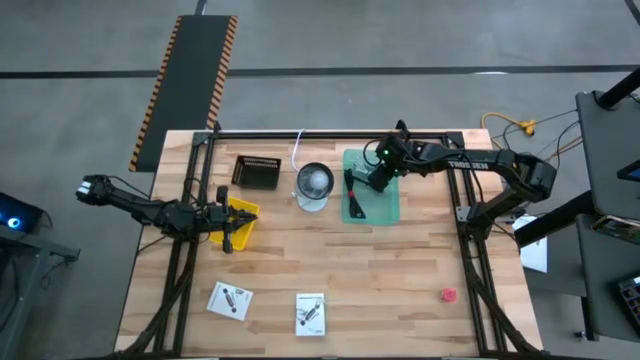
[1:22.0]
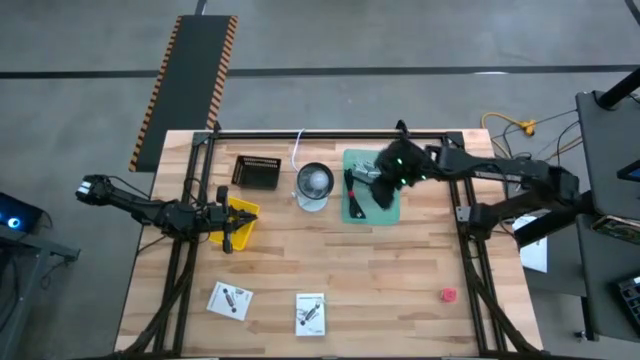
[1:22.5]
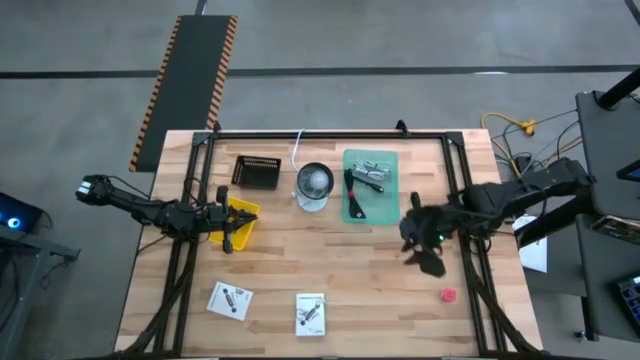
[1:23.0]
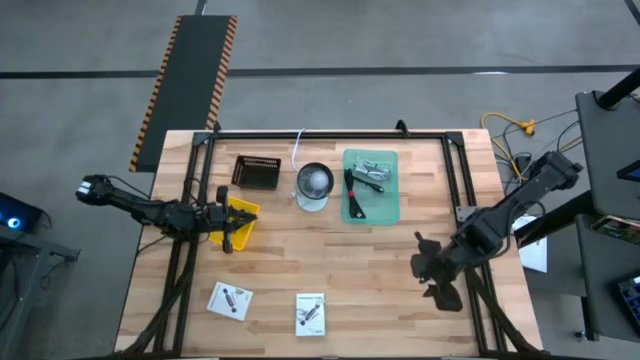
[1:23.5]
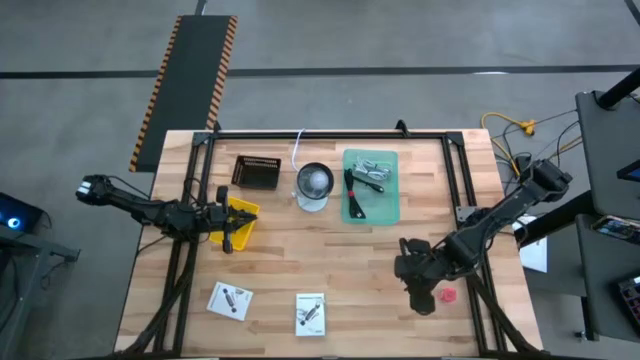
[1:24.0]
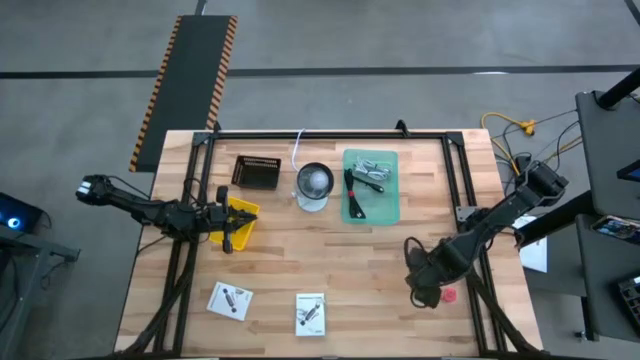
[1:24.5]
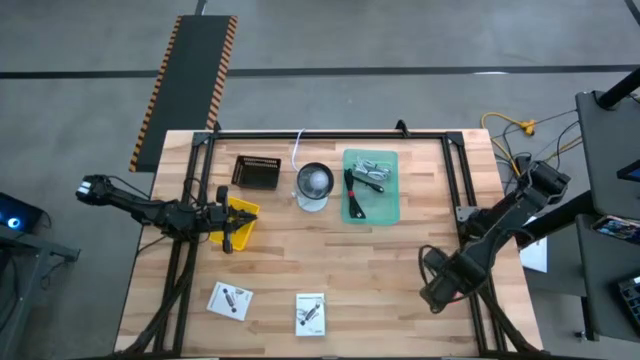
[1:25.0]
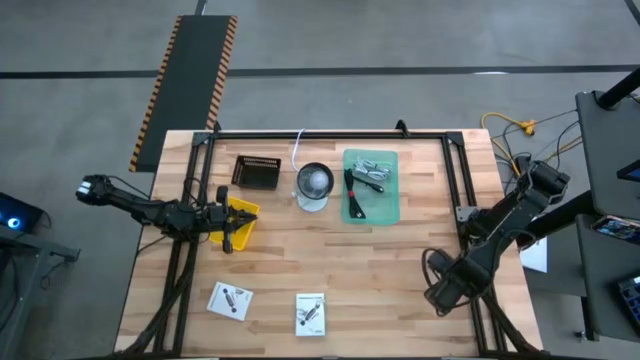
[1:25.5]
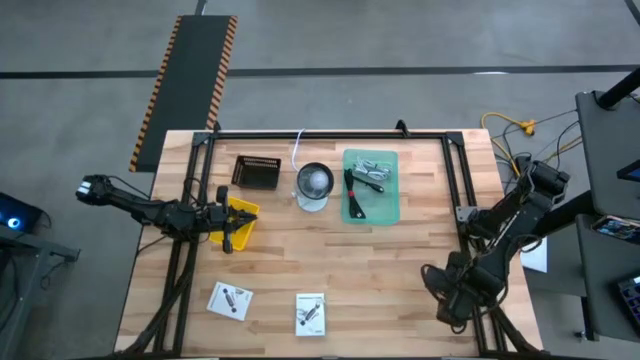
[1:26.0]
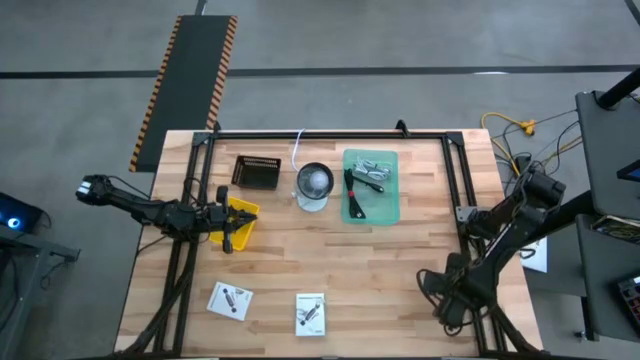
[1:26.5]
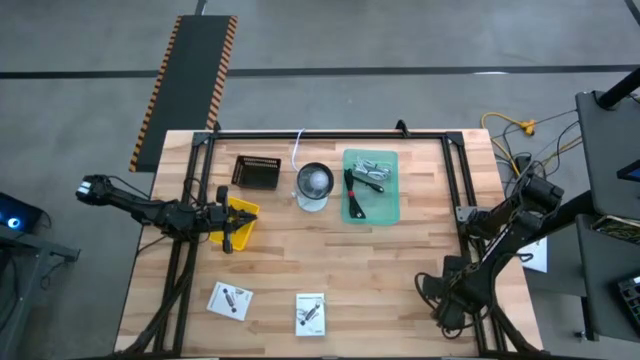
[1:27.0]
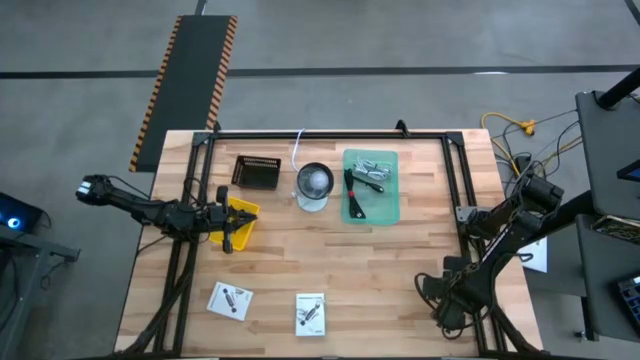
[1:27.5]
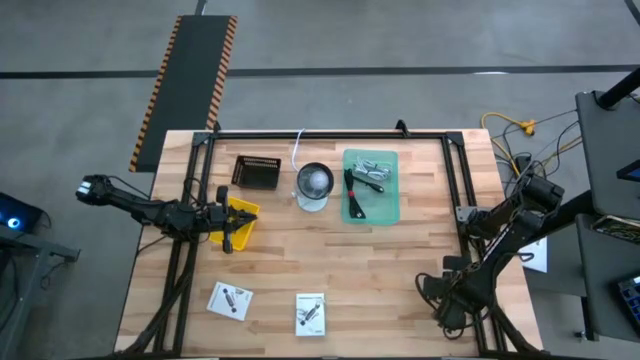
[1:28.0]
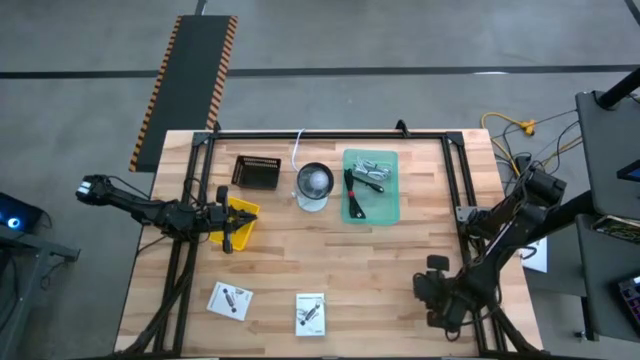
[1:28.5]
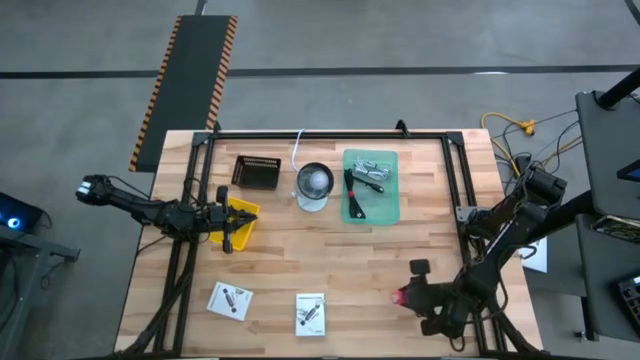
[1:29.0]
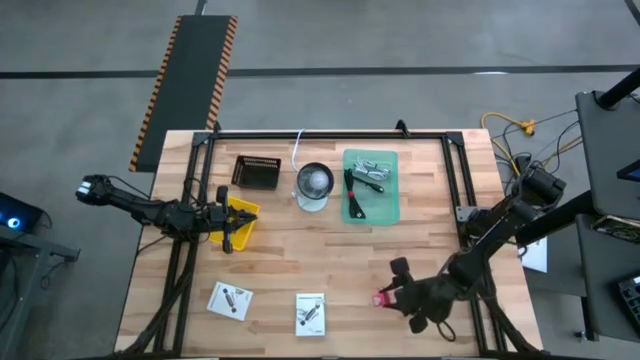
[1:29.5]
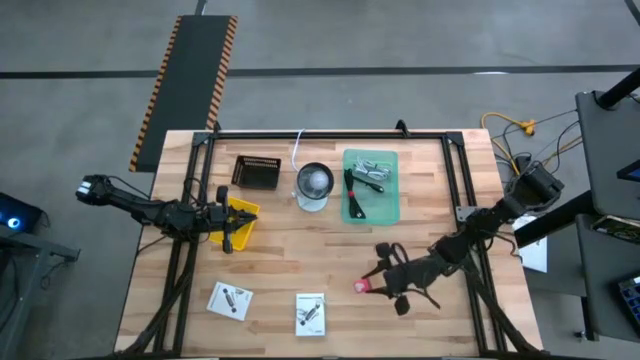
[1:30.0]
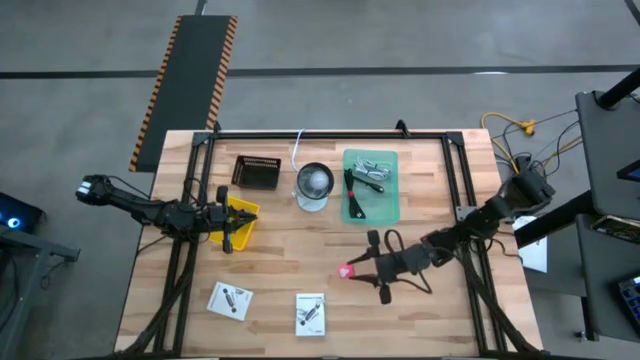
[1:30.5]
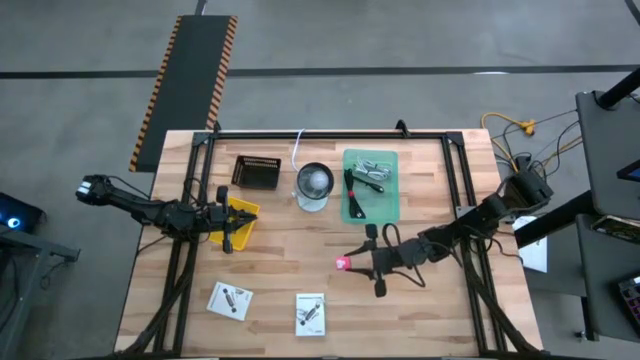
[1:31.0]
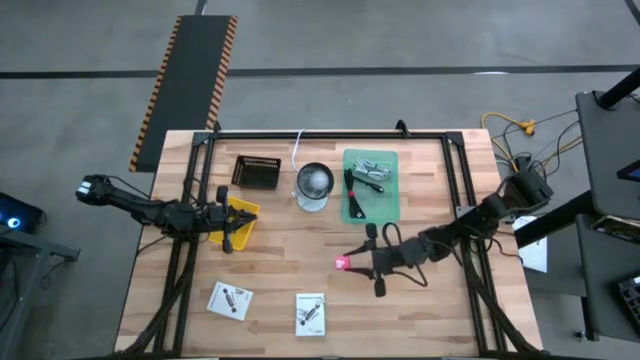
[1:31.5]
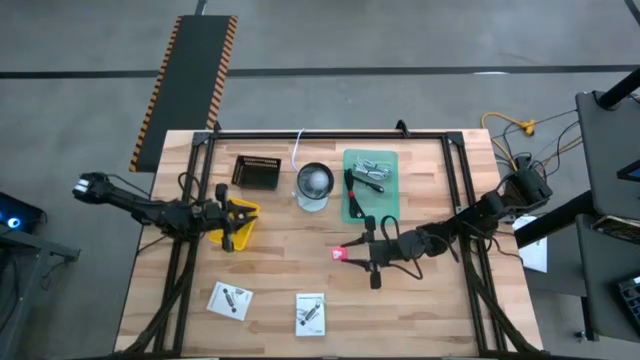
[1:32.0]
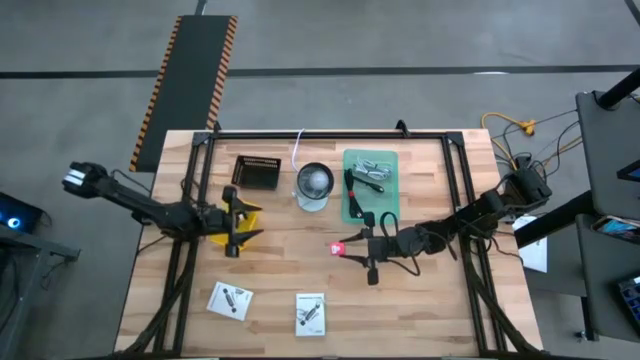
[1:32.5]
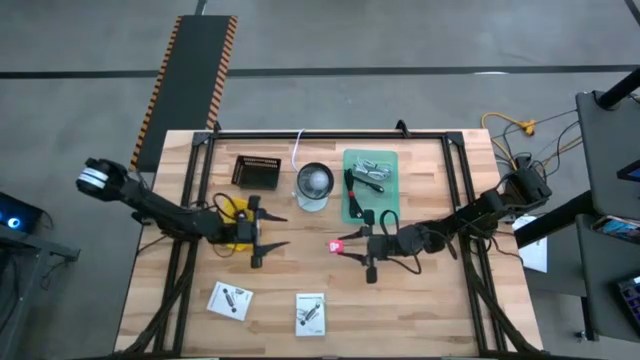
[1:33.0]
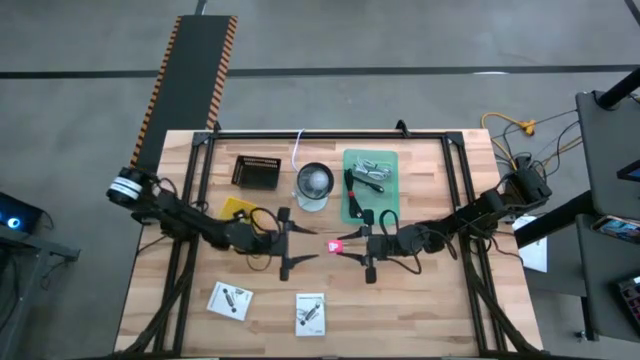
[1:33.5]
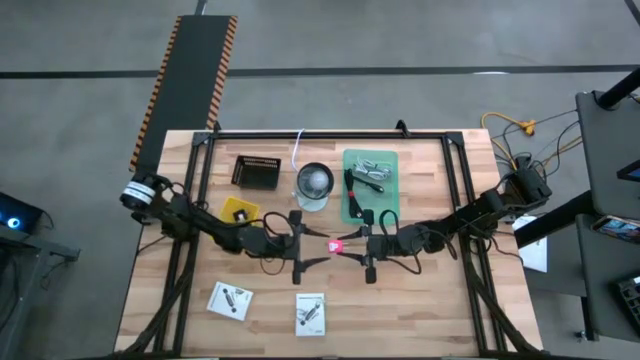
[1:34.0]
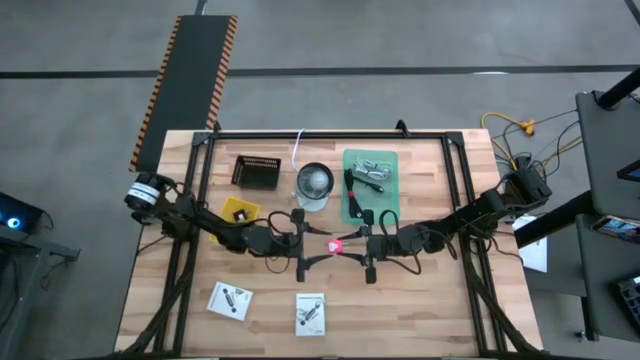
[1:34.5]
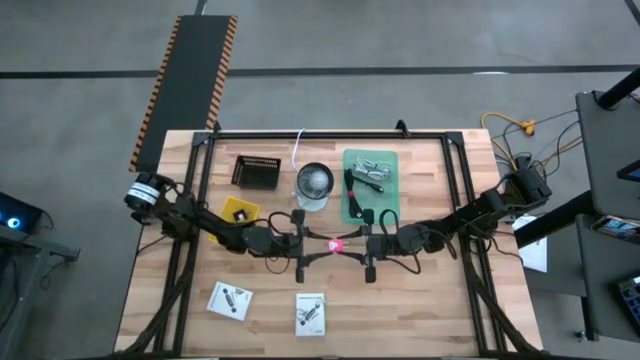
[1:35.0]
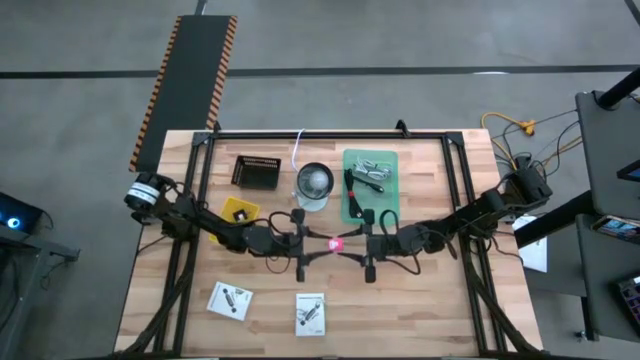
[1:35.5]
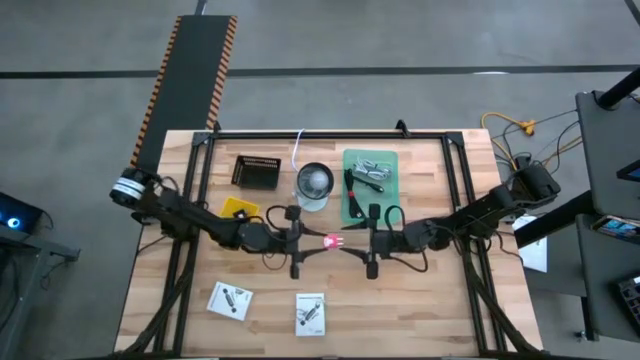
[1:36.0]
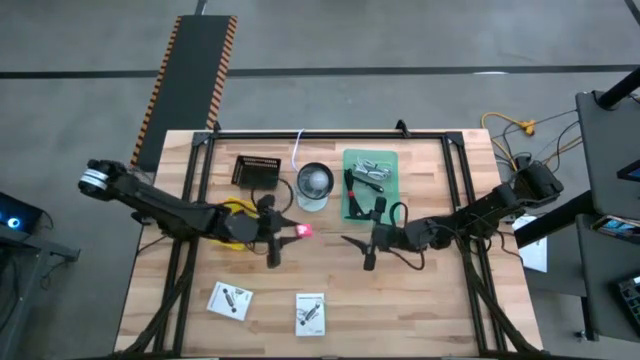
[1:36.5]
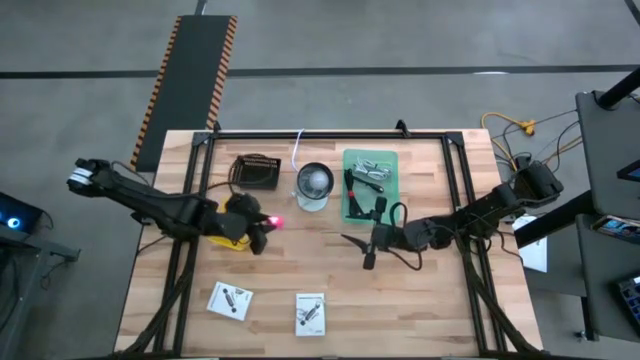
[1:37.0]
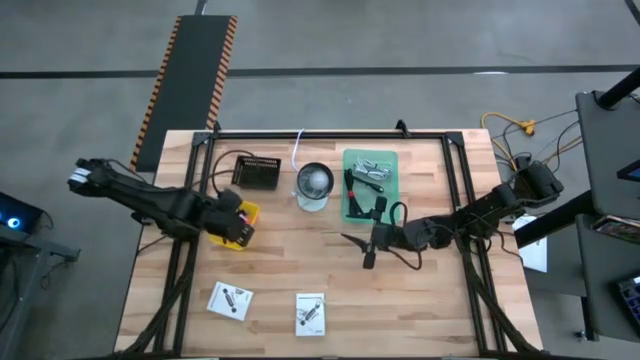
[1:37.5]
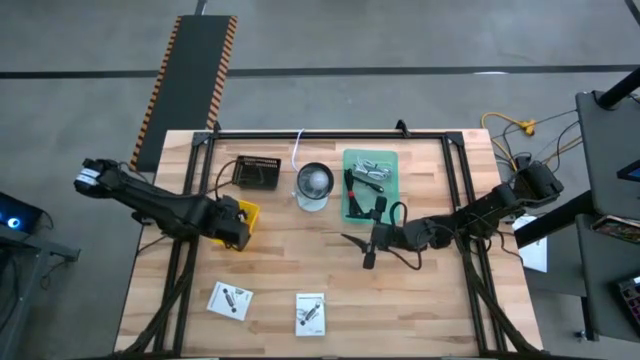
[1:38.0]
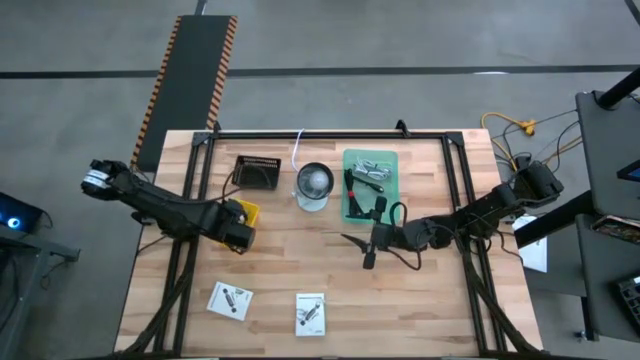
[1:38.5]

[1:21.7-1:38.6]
Task: Pick and place items into bin
Put the pink charger adapter into the yellow bin

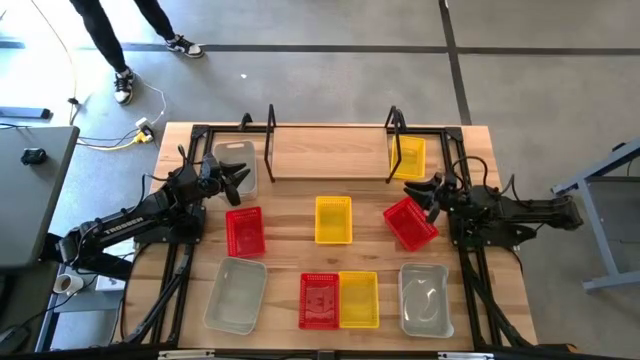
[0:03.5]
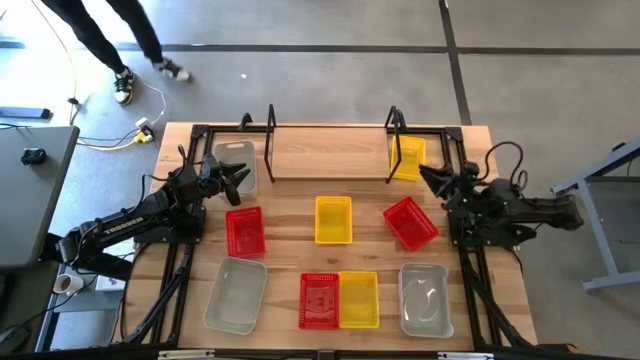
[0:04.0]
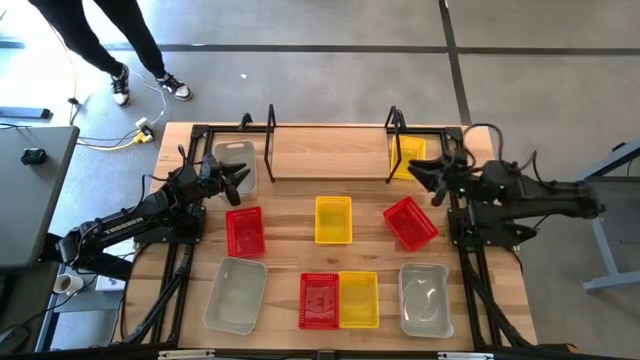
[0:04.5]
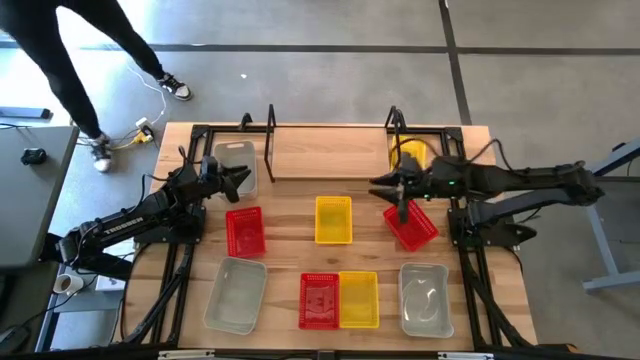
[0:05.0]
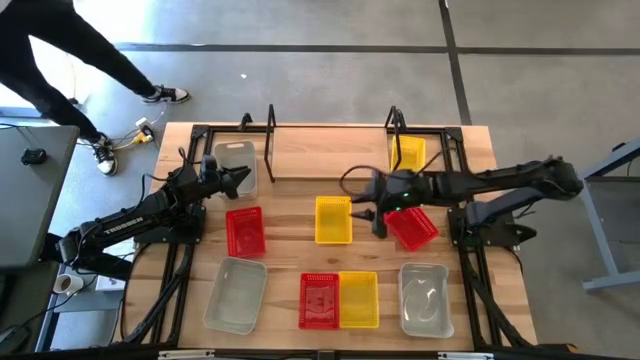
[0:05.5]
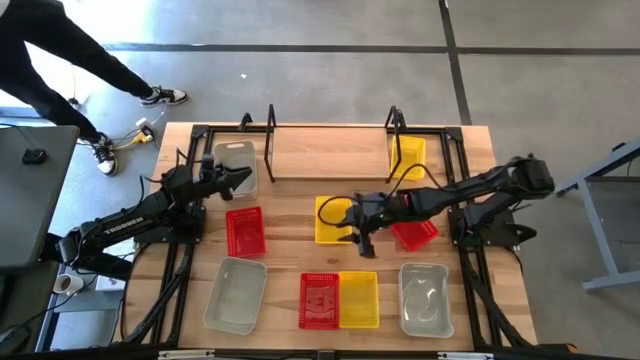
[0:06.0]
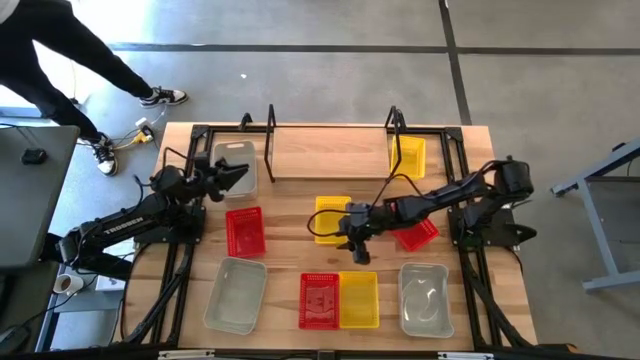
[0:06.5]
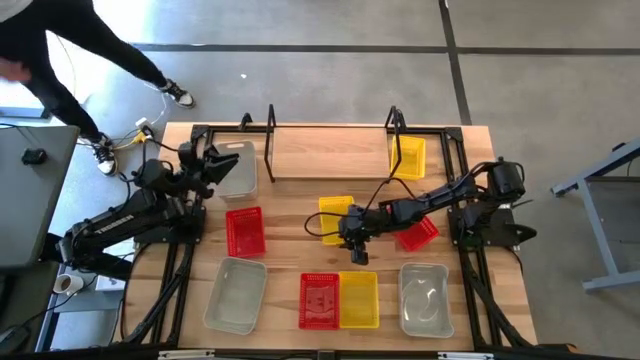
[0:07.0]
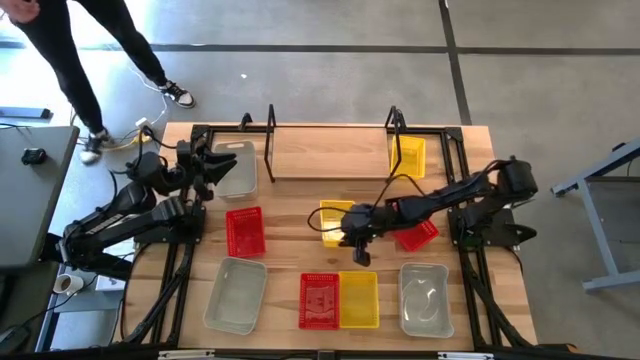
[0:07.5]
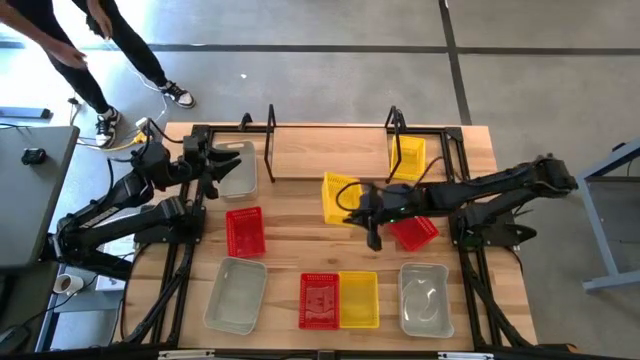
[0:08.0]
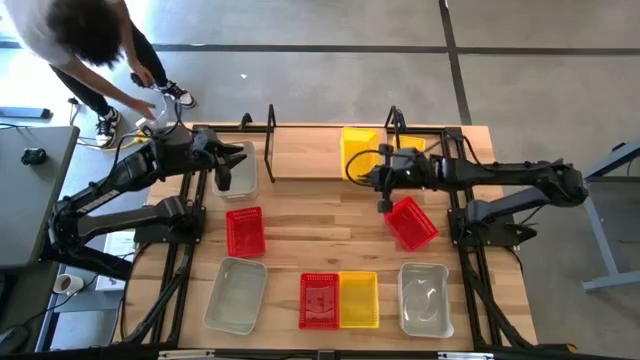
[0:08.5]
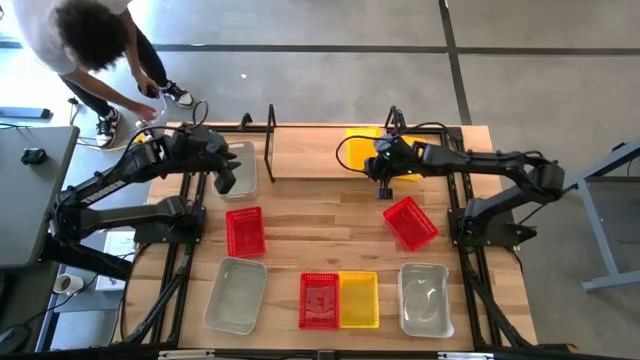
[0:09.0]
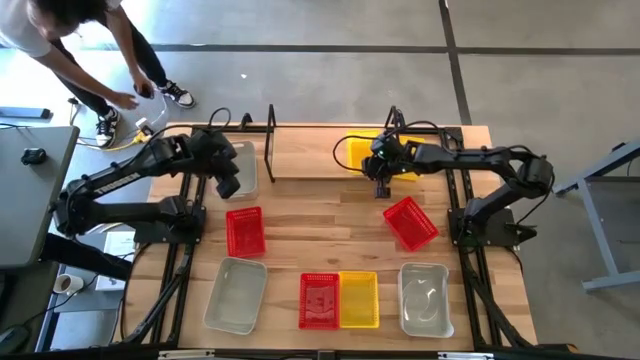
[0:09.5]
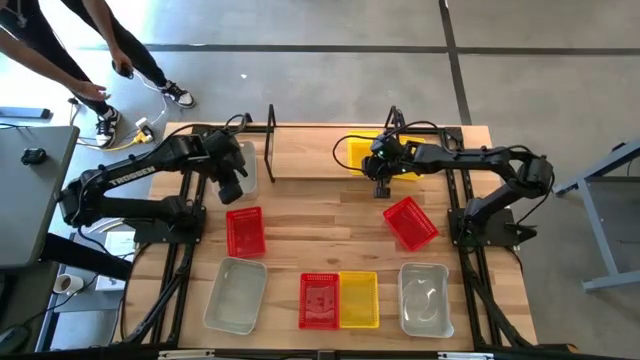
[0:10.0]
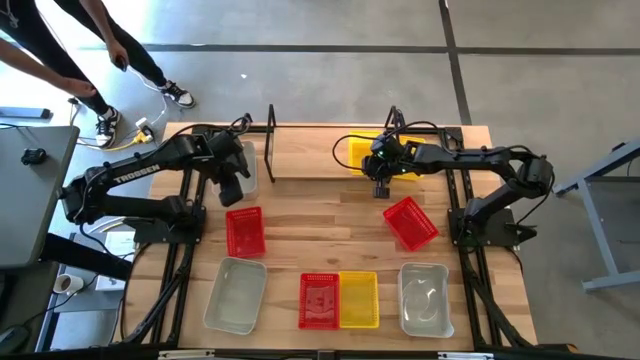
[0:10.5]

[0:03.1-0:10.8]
Task: Stack baskets on shelf by color
Put the middle left yellow bin on the shelf
